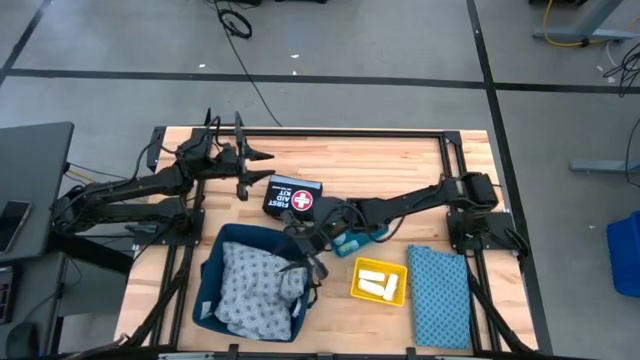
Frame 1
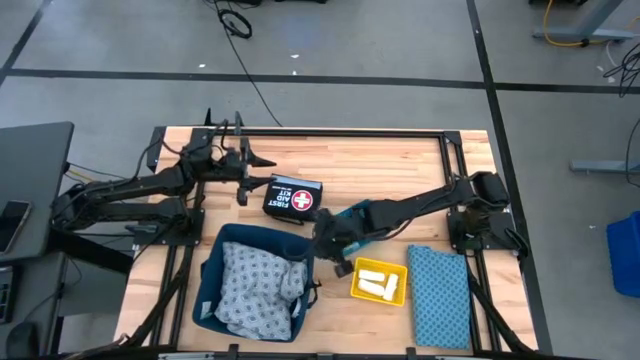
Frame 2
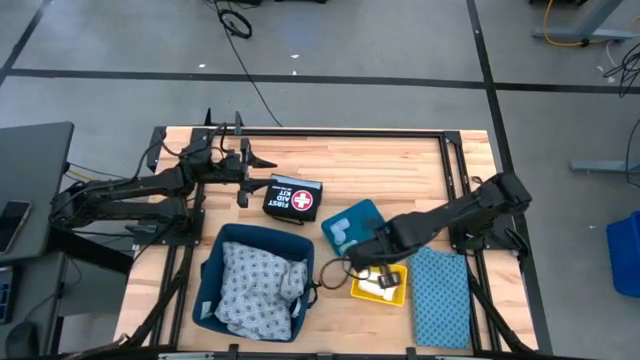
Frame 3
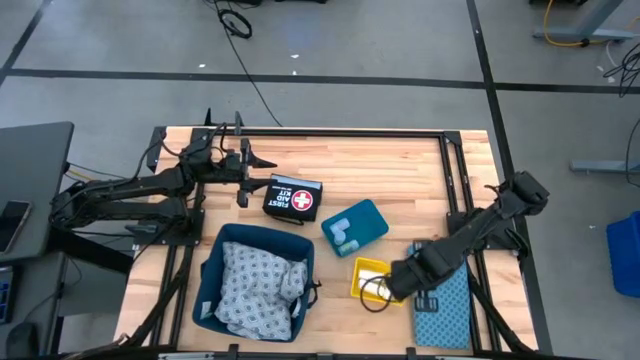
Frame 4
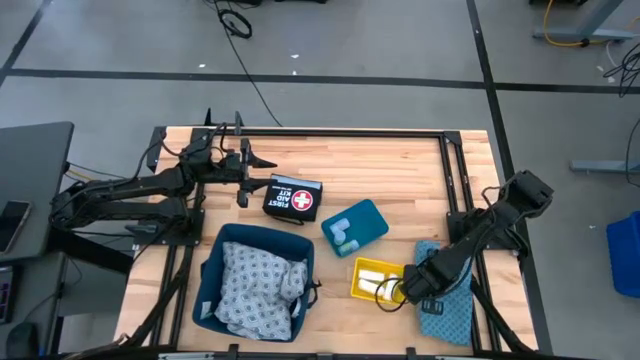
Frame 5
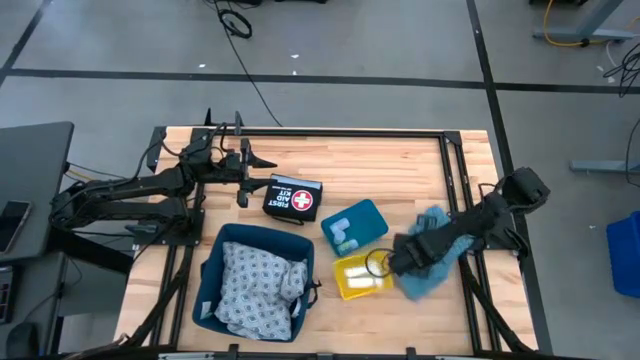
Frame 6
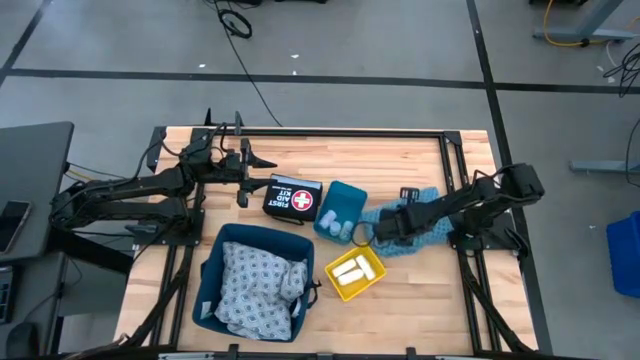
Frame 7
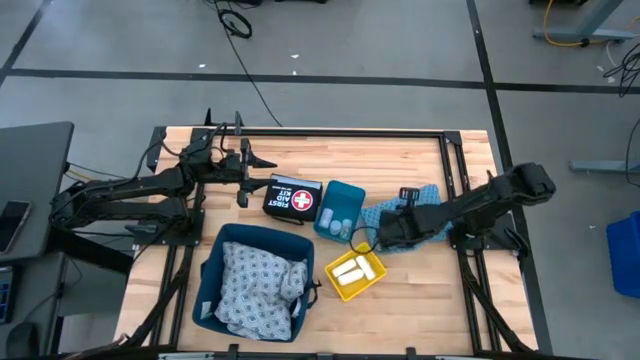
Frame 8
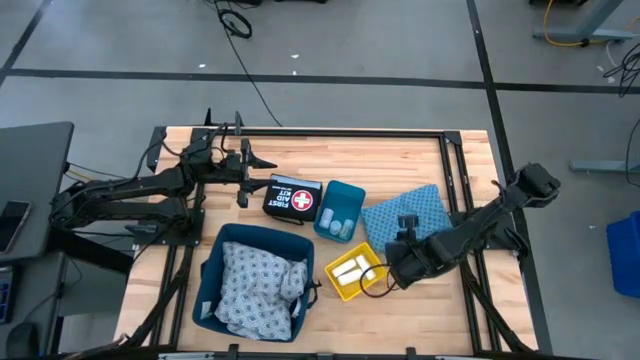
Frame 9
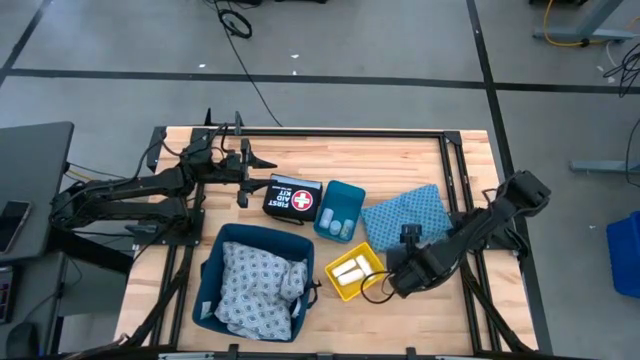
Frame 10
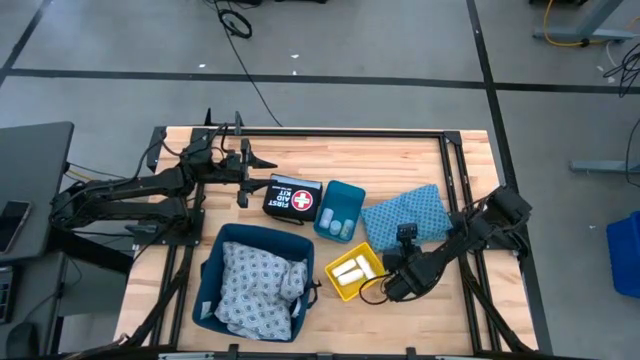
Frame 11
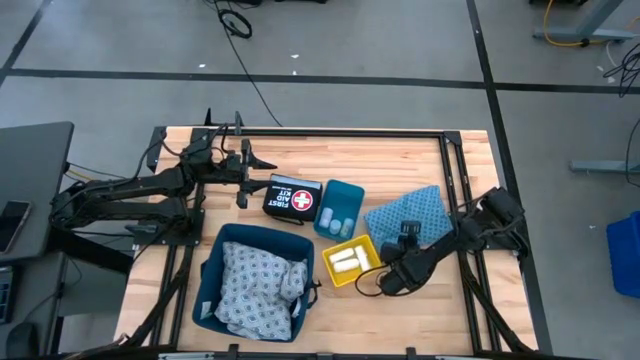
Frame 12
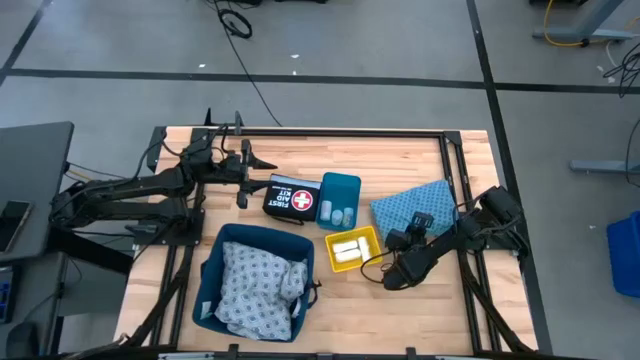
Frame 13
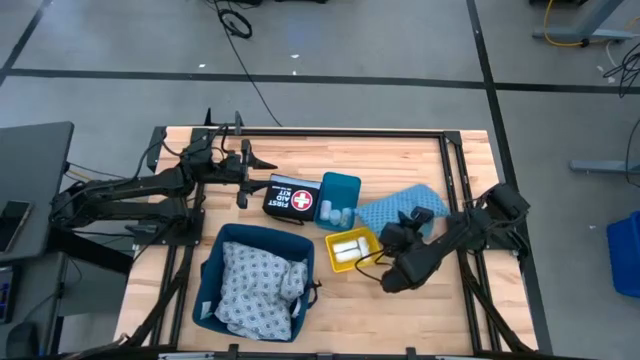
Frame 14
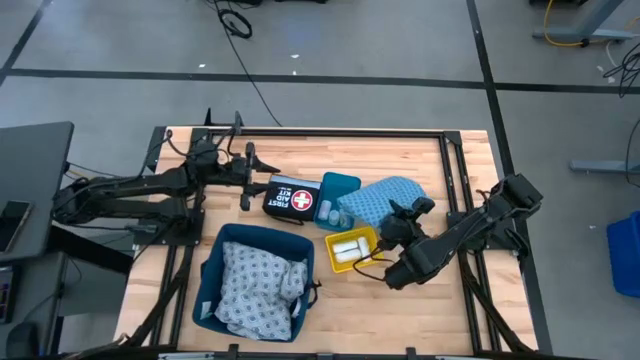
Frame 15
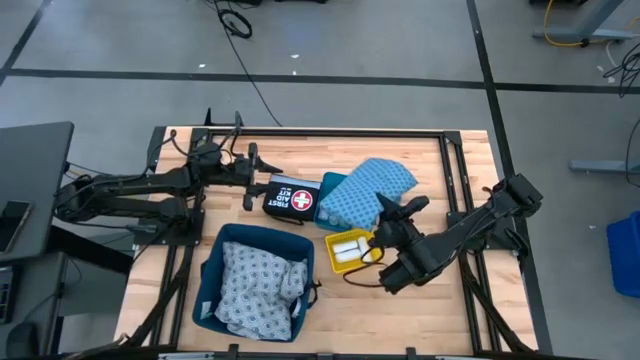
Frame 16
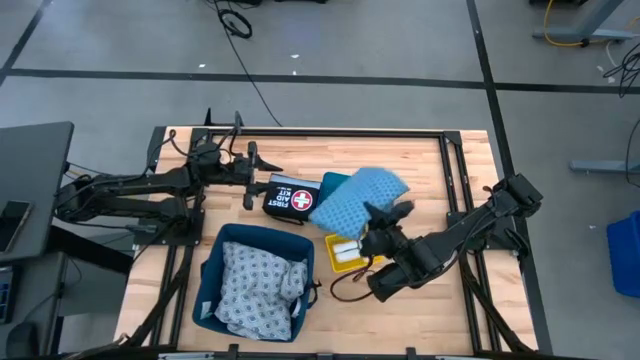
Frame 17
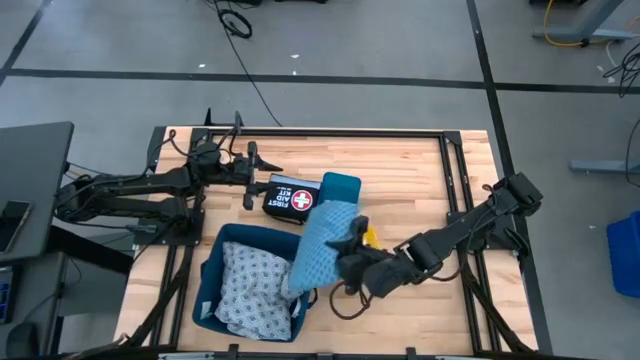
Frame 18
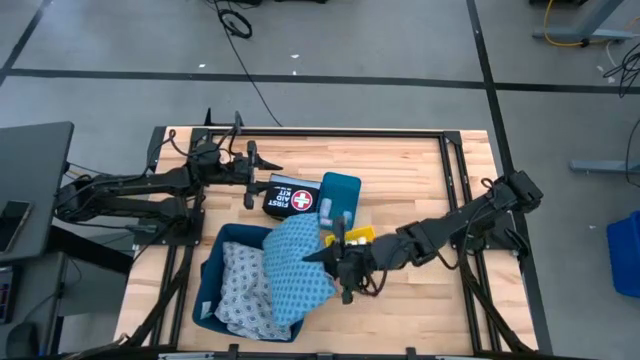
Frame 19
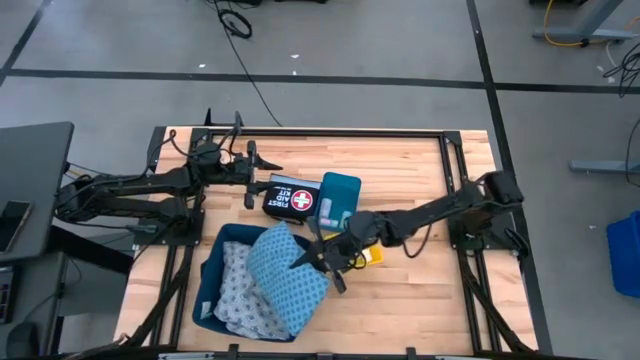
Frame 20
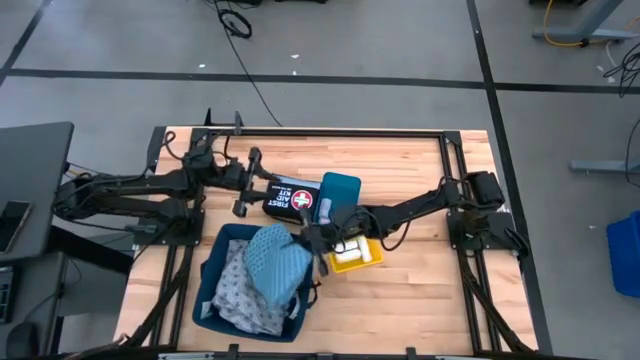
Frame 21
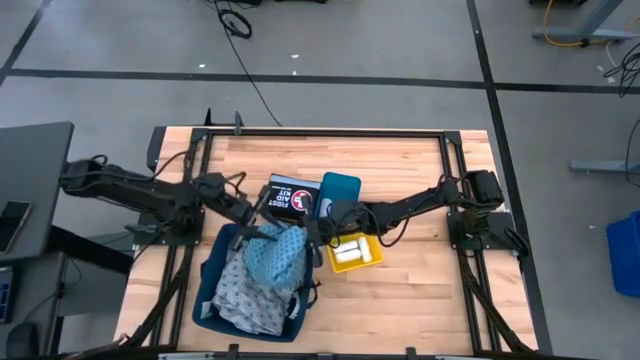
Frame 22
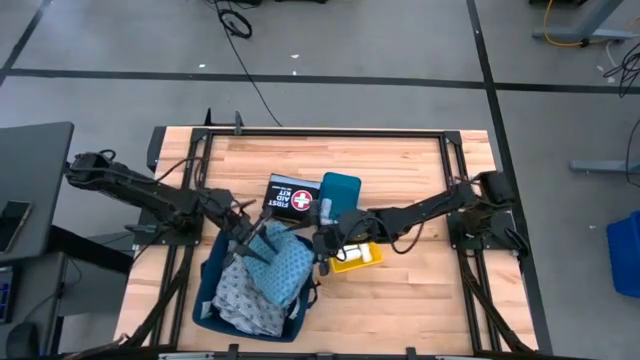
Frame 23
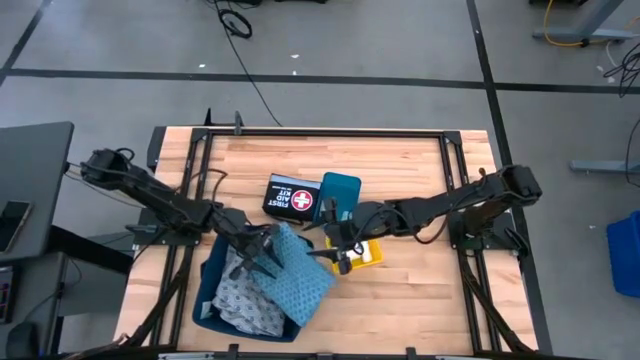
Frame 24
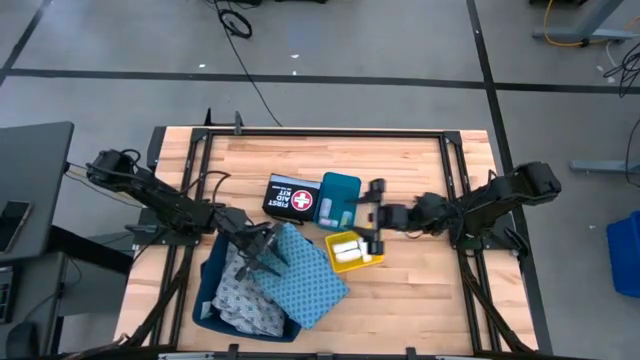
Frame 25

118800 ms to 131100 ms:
Task: Pick & place medical supplies in basket/bin
Put the blue gown into the blue bin

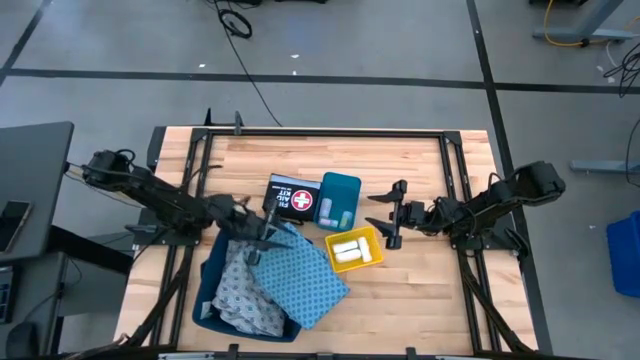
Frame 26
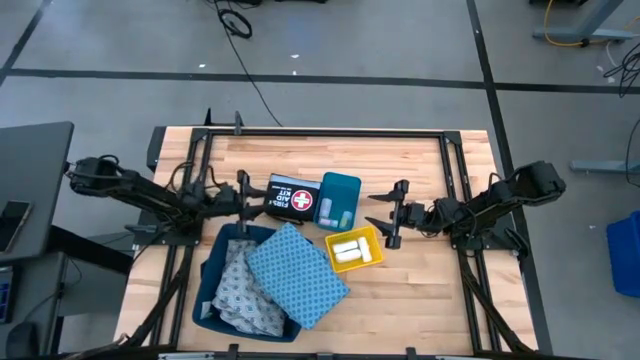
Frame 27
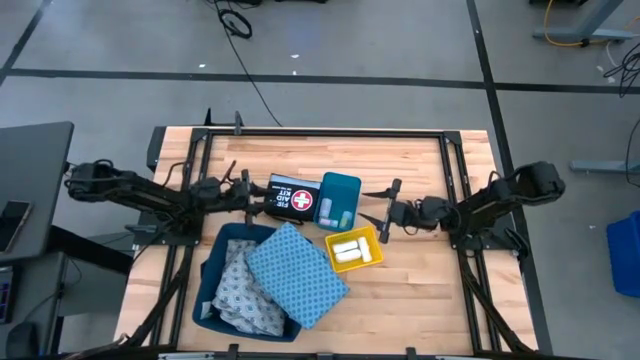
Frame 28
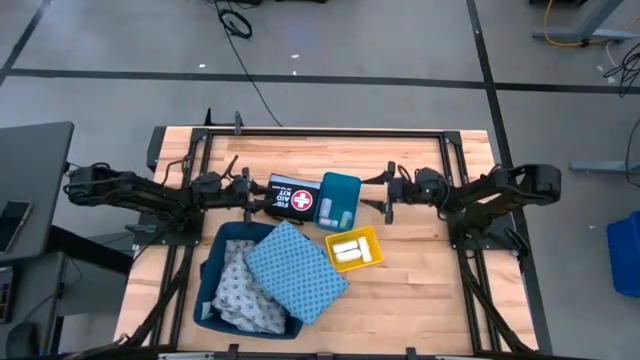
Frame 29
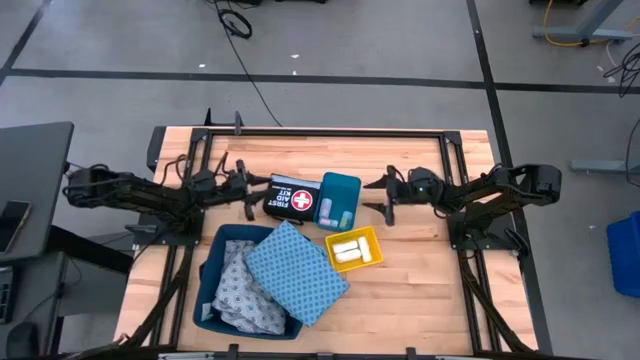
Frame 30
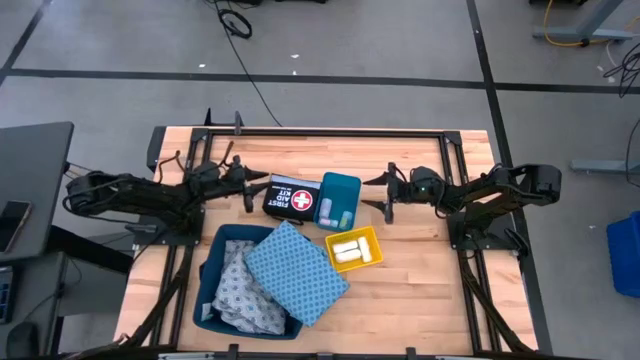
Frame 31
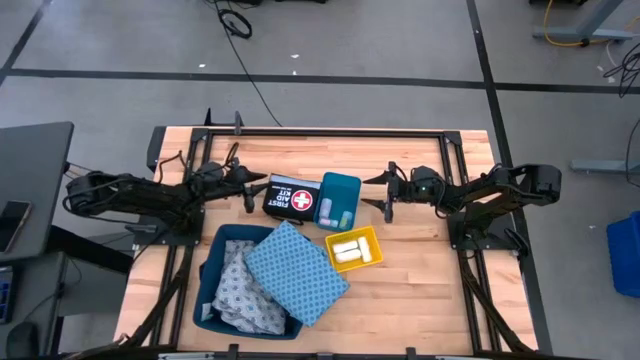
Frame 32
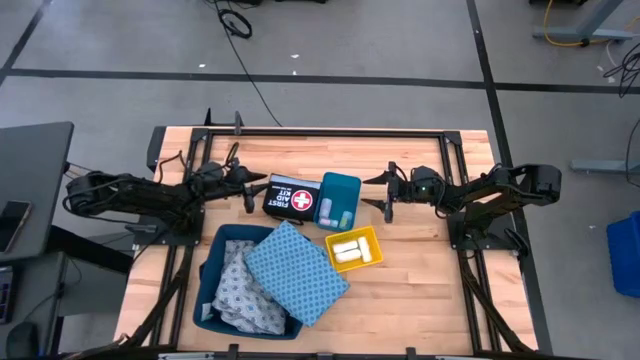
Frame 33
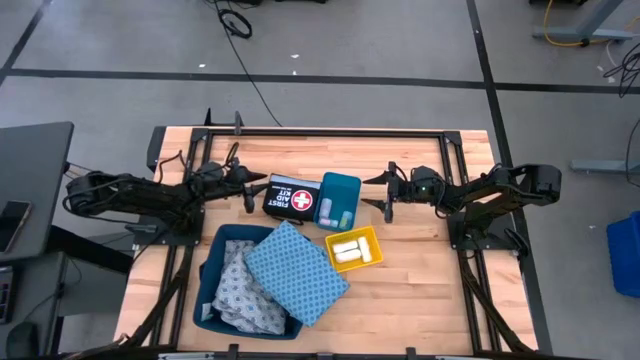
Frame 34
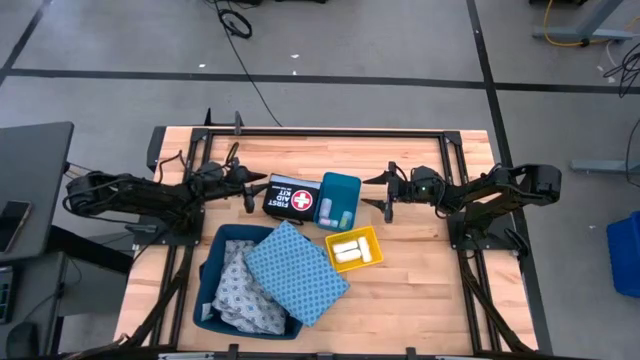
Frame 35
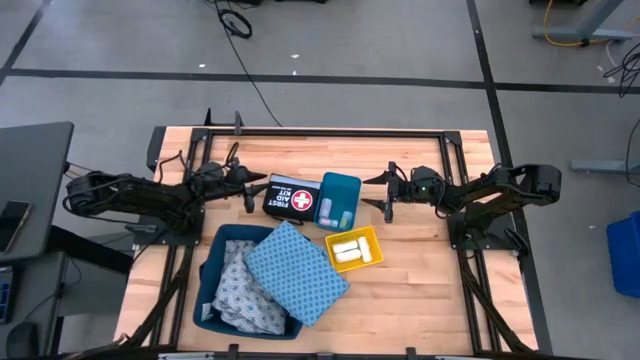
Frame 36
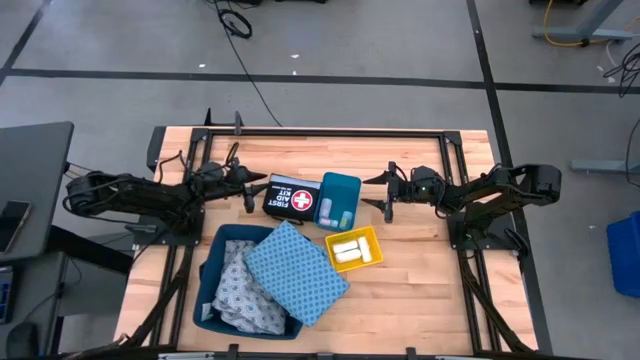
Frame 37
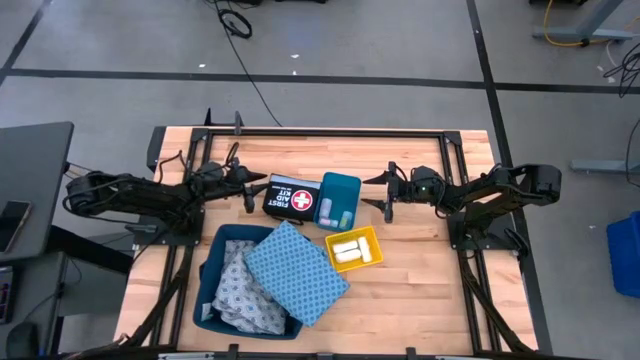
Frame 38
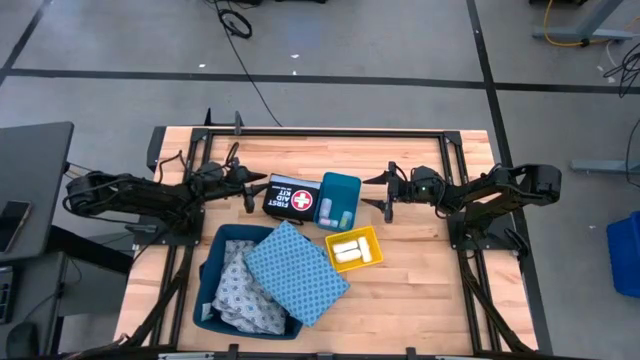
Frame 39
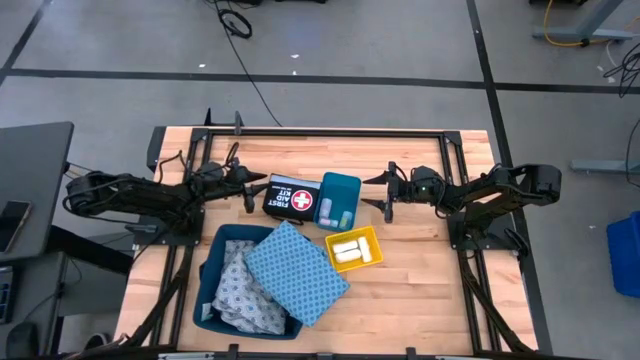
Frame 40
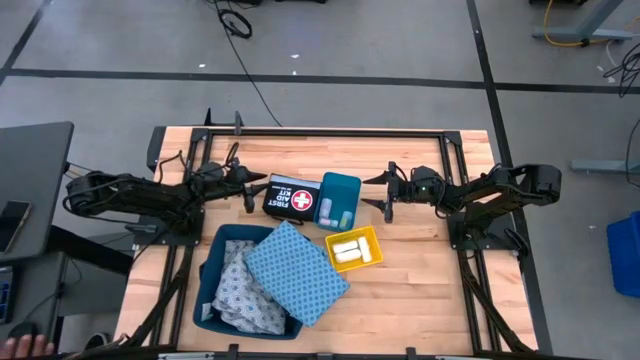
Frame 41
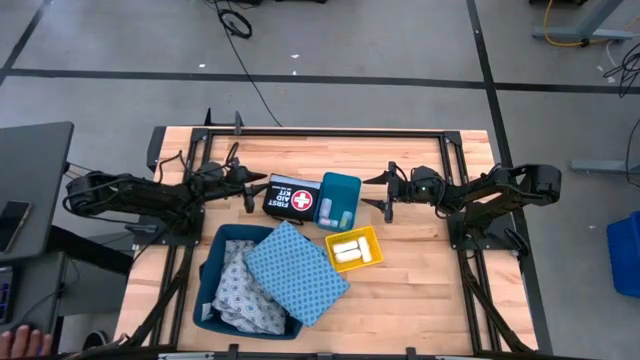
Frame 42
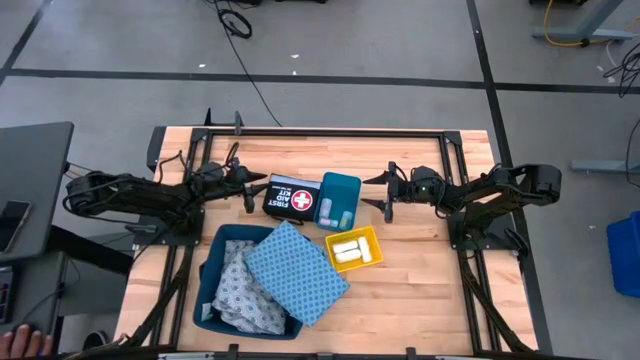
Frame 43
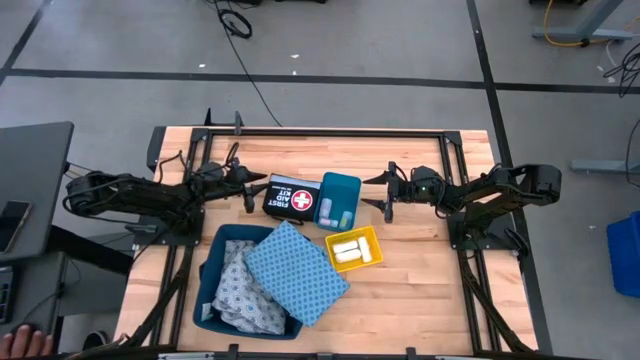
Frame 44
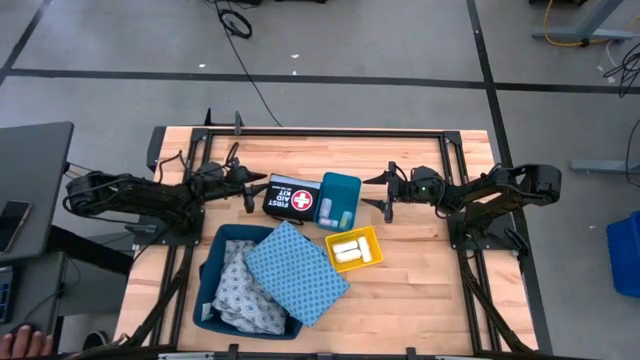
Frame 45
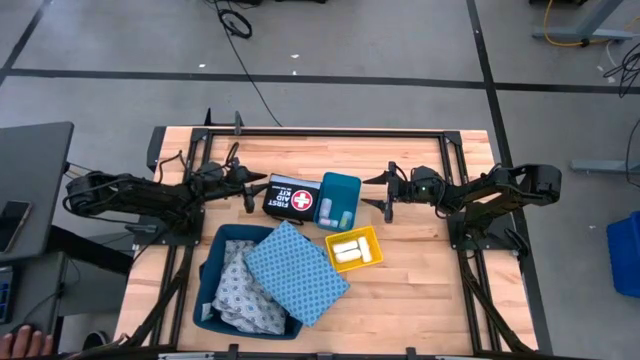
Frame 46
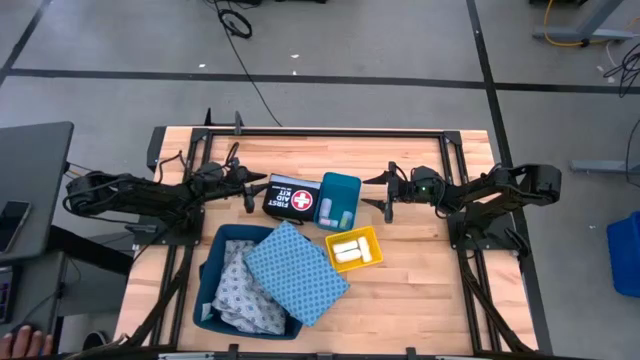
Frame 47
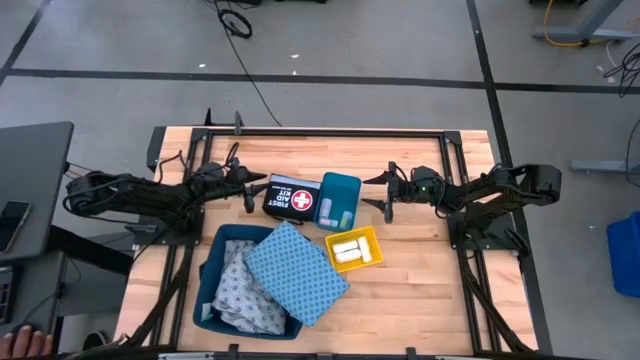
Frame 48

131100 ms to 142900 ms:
Return to Home Position
